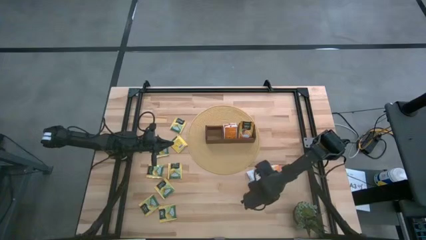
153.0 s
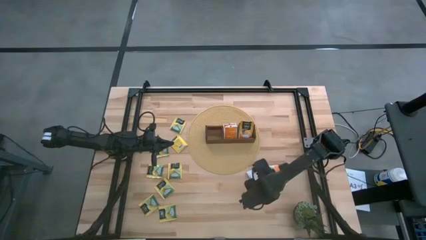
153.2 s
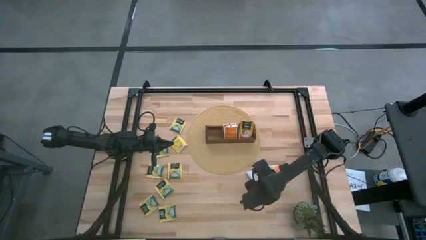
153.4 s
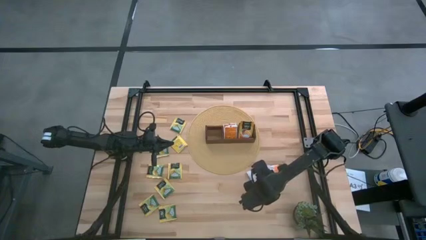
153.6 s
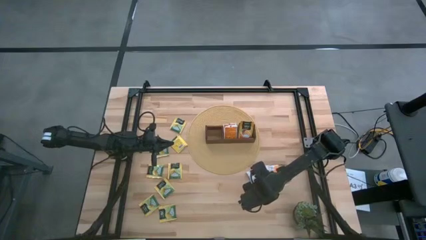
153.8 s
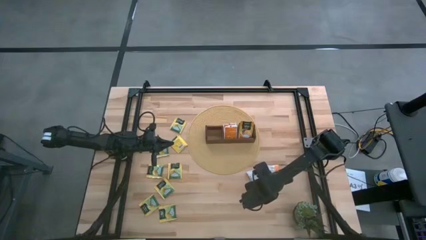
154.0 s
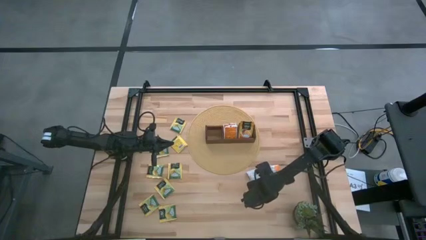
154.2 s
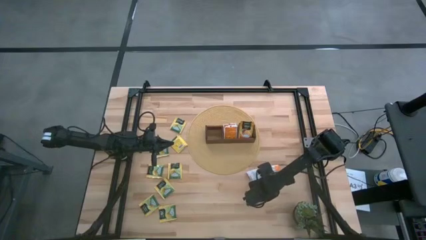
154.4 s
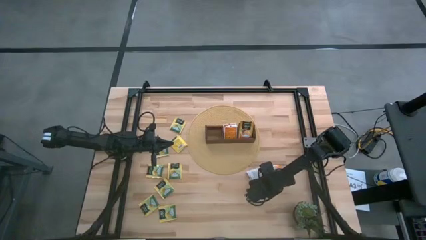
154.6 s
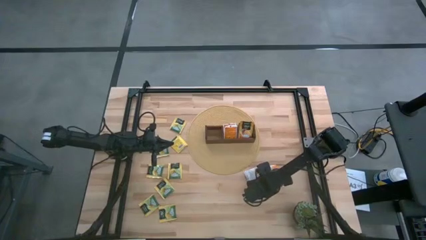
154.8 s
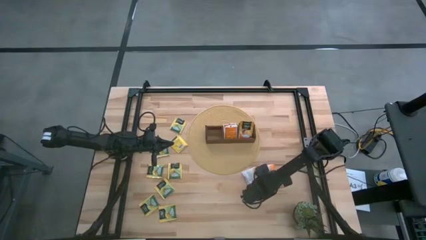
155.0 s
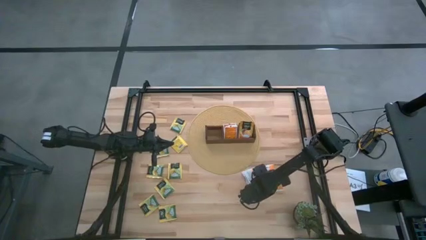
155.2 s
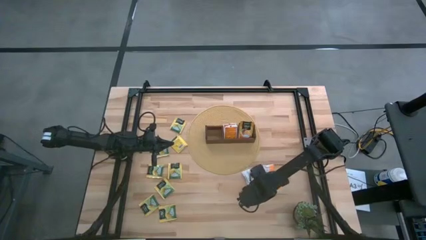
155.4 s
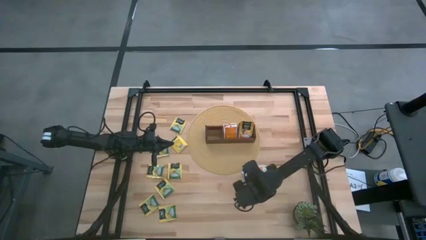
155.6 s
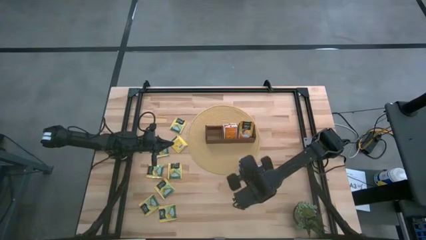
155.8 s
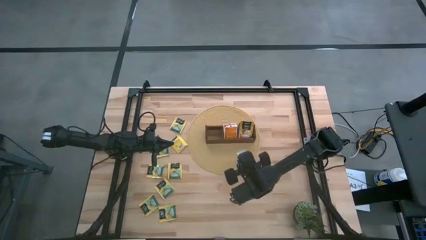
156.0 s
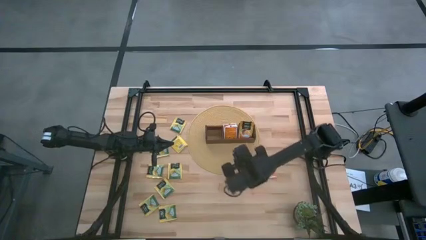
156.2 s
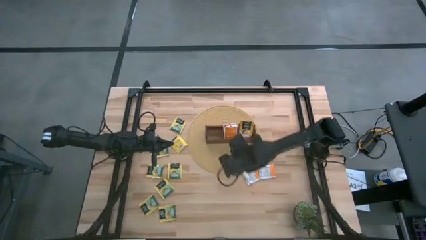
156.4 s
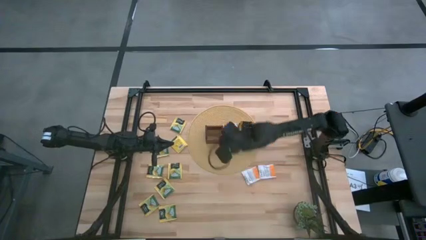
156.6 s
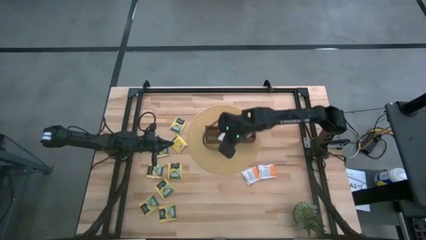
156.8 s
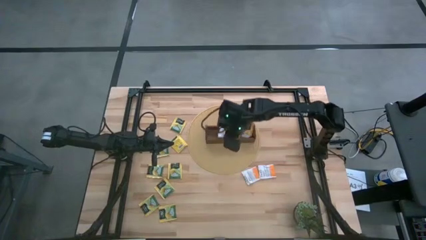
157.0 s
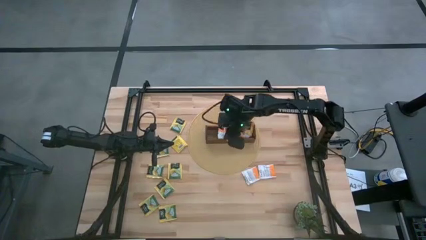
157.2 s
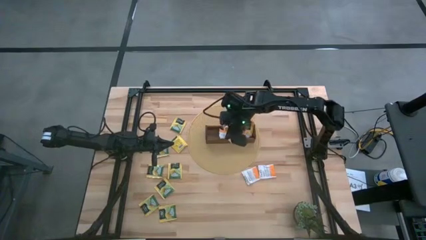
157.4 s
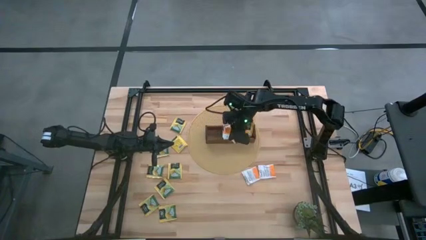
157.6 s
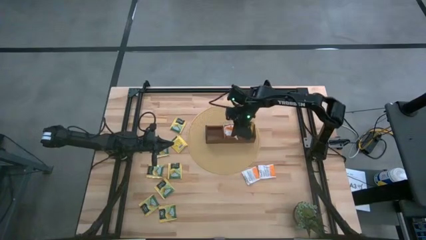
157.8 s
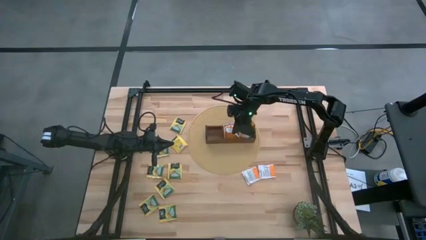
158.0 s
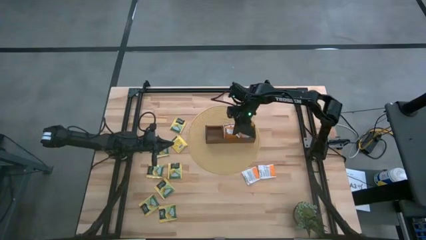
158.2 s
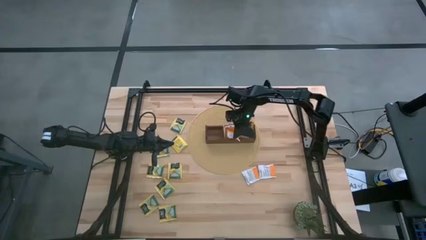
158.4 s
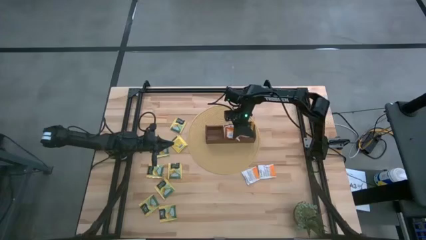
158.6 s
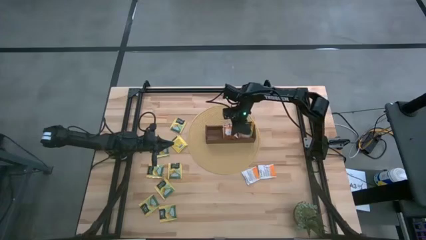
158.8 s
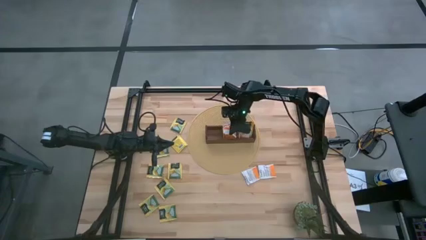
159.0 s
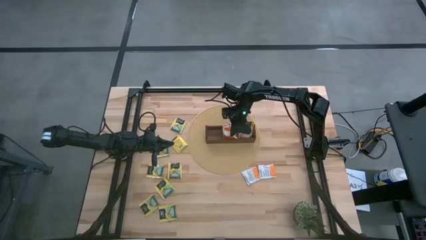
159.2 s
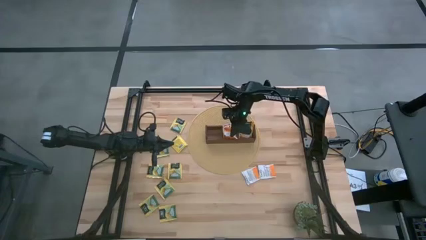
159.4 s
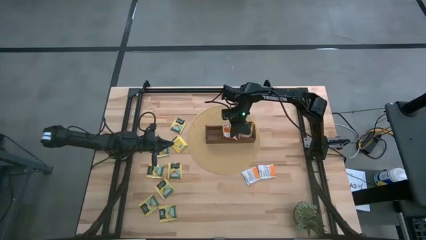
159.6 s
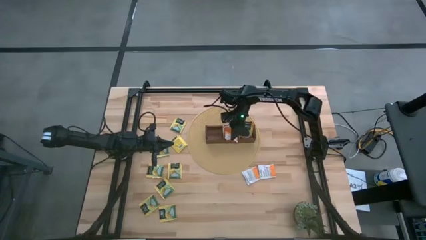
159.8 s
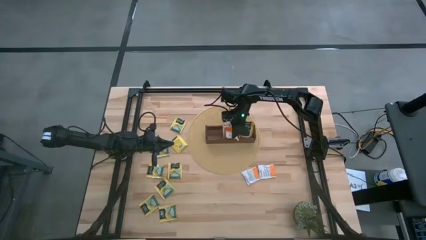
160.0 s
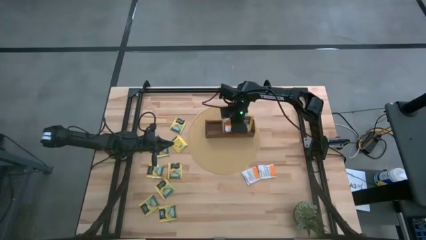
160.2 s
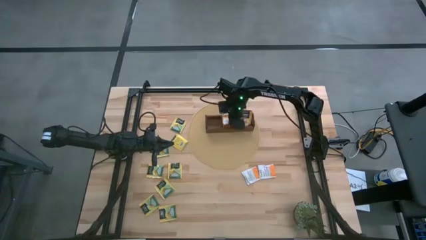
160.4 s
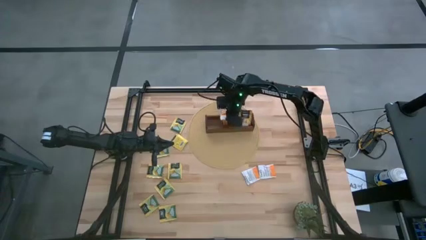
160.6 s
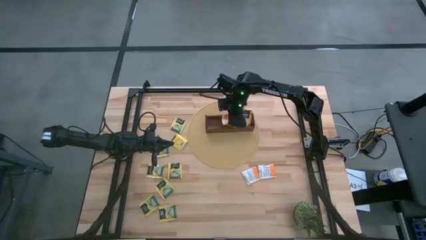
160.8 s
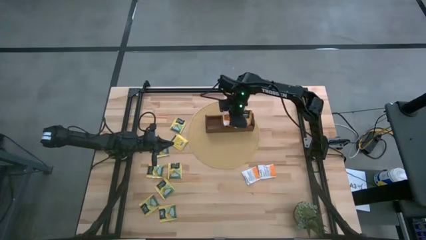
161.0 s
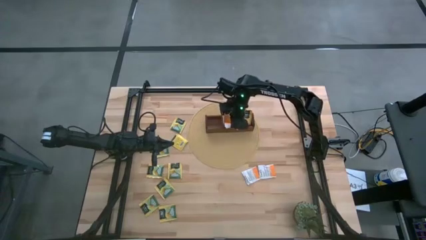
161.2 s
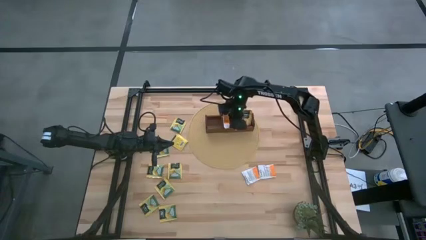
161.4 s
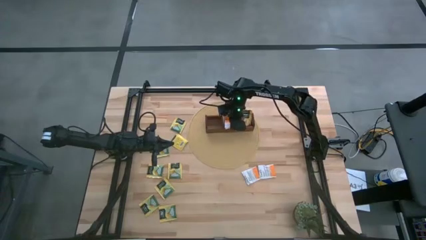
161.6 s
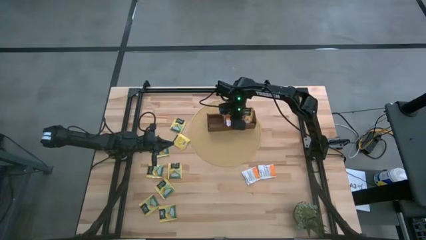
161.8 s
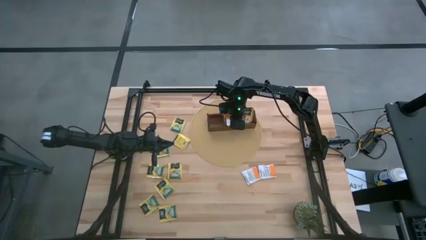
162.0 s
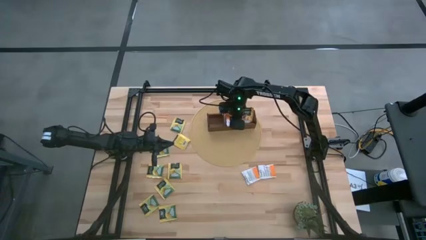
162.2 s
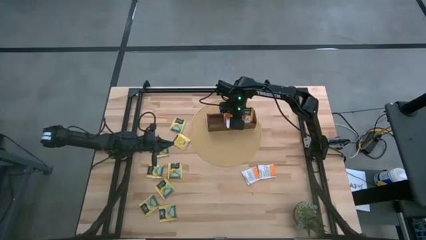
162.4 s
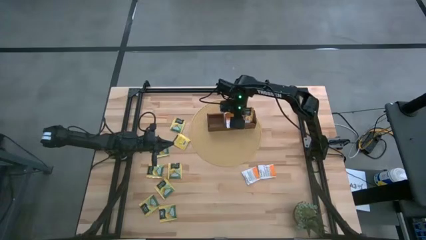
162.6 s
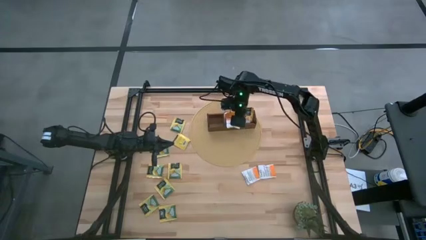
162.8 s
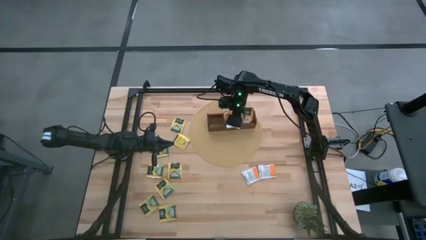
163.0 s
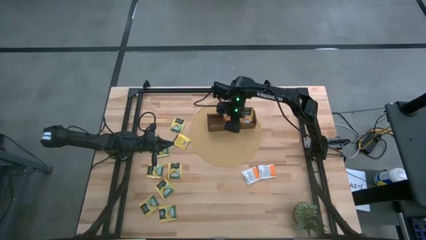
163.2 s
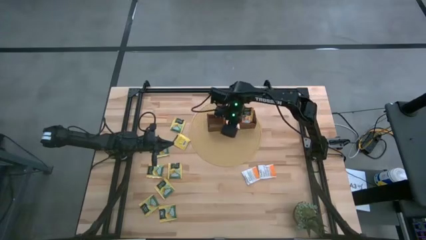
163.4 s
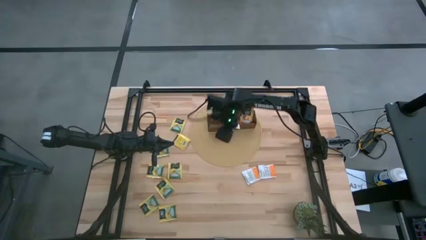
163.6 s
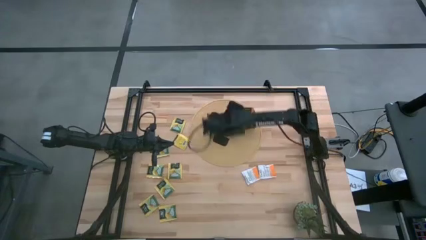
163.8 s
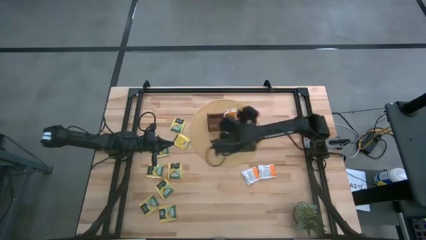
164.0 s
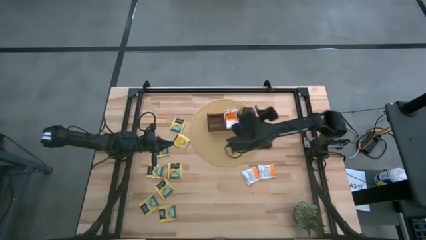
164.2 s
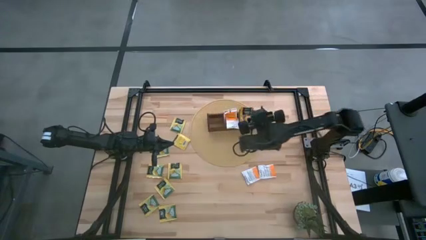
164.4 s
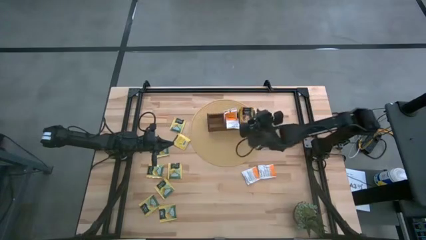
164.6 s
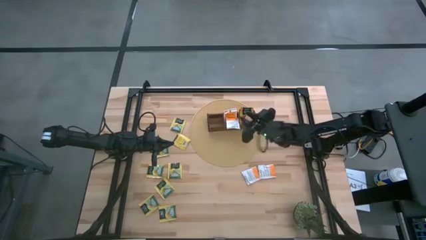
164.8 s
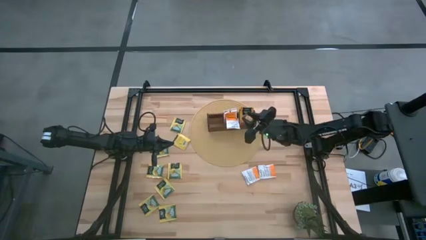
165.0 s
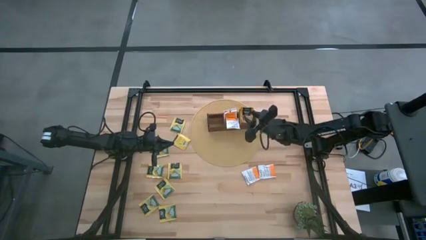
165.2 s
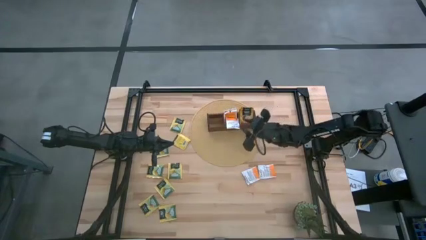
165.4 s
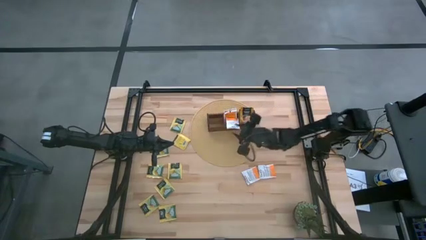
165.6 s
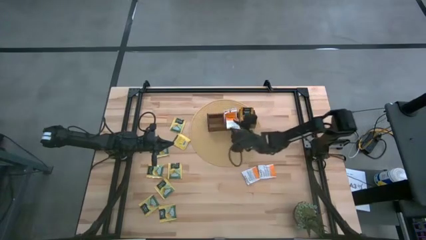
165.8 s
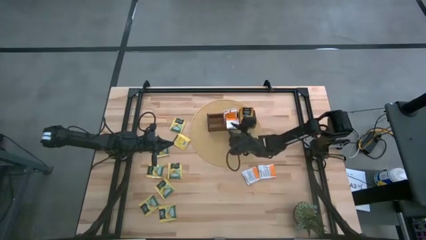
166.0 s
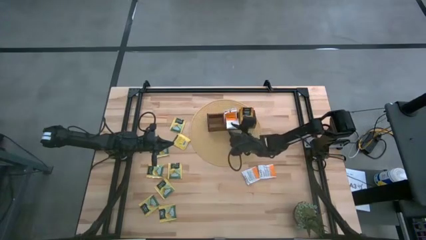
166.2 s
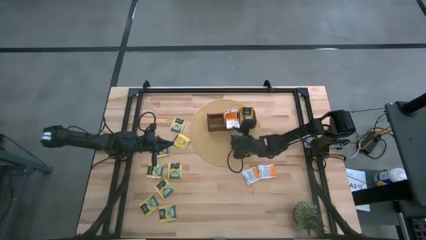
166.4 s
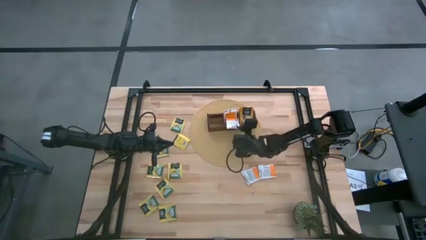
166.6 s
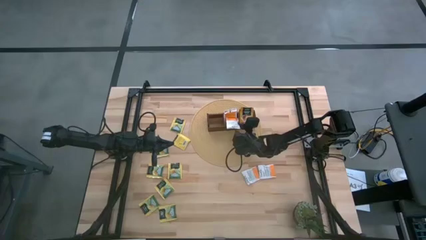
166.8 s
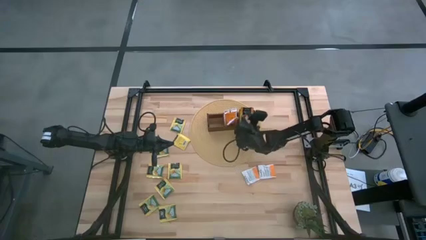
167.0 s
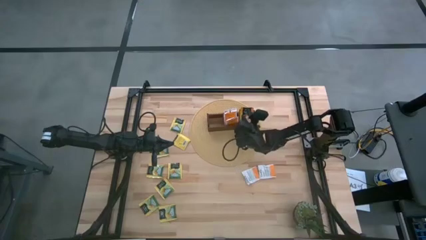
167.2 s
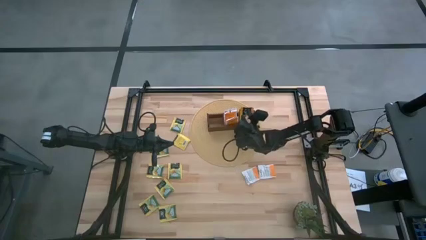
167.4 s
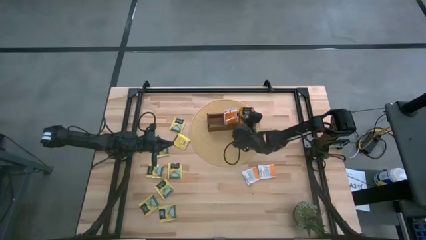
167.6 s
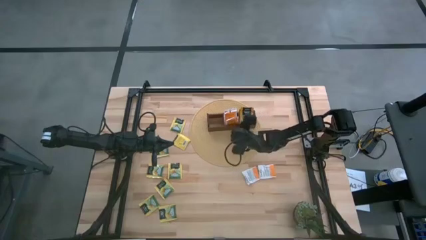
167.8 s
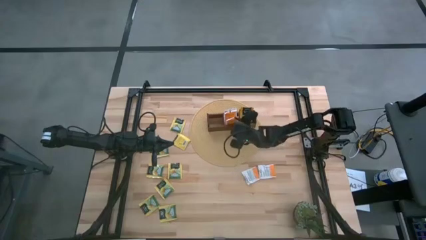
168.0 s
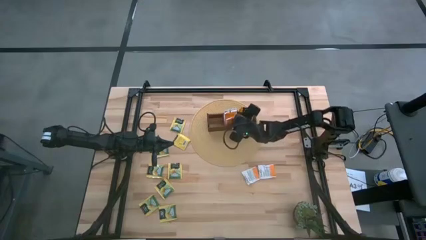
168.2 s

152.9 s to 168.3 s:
Task: Pick & Place Tea
Put the white tea bag into the middle section of the wooden organizer
